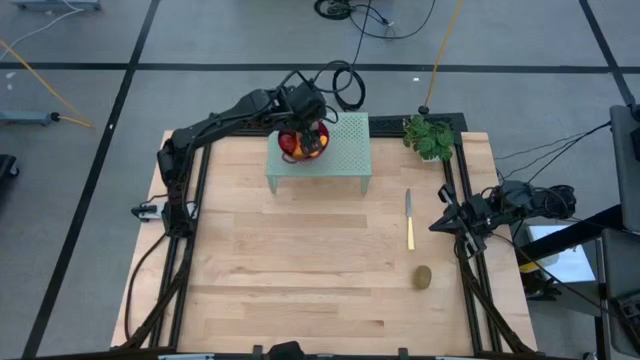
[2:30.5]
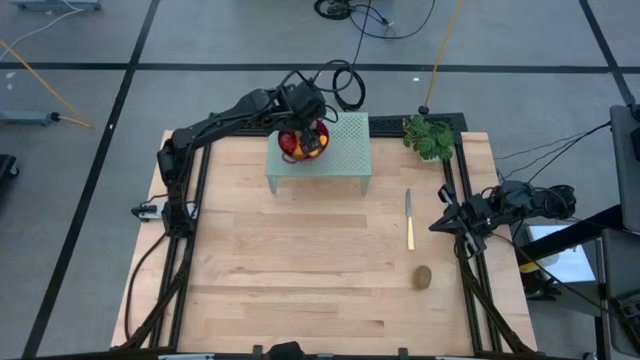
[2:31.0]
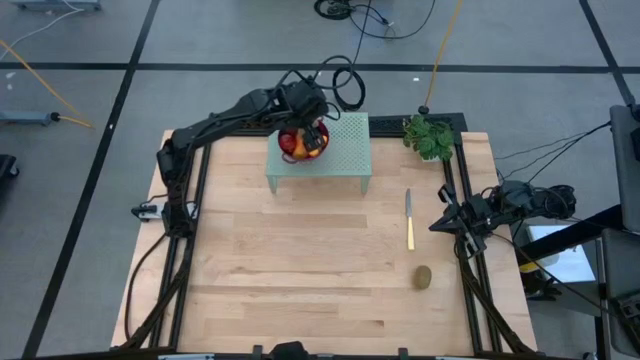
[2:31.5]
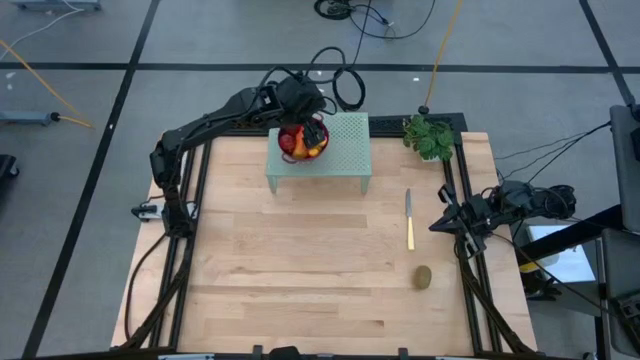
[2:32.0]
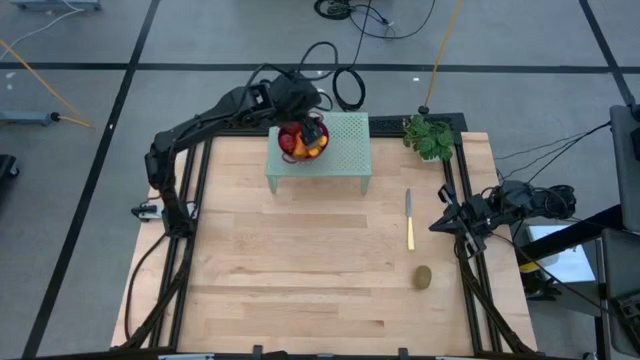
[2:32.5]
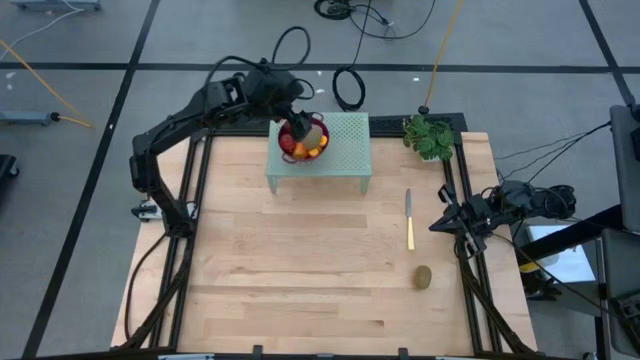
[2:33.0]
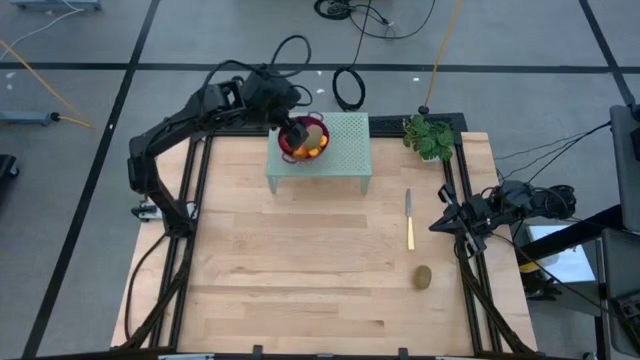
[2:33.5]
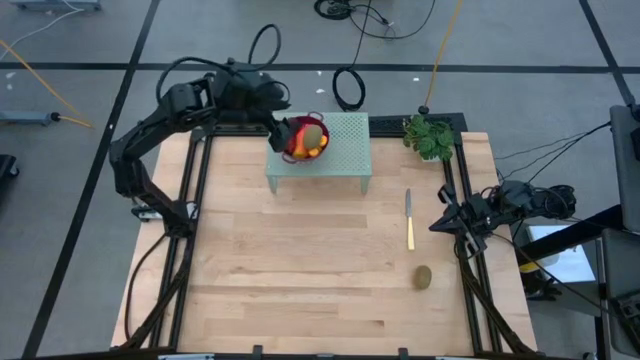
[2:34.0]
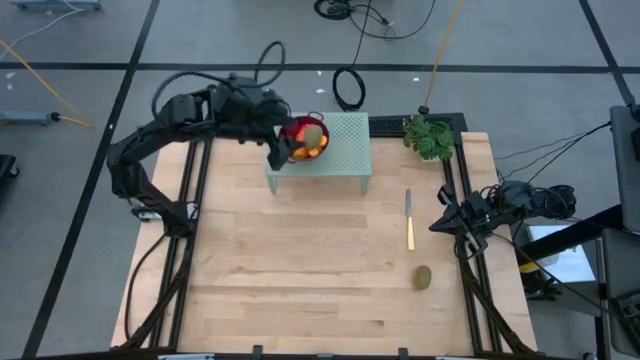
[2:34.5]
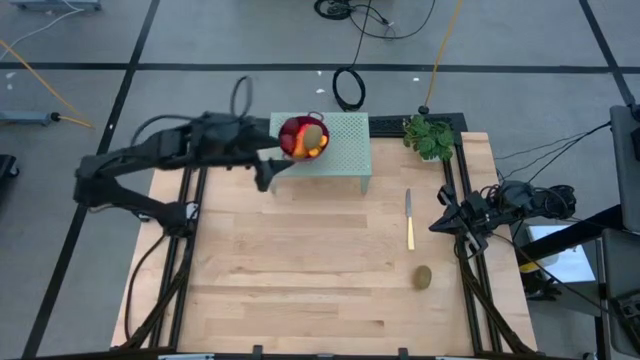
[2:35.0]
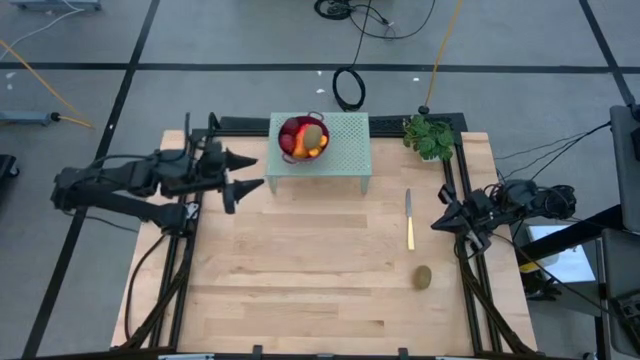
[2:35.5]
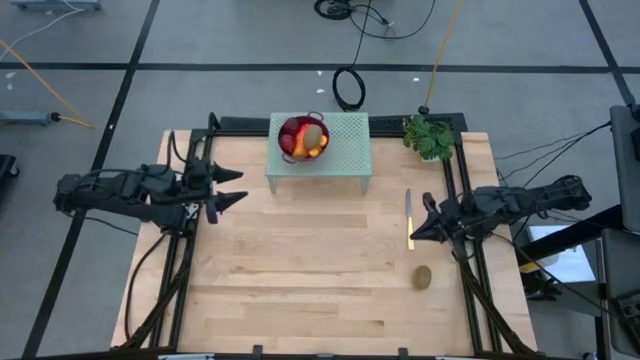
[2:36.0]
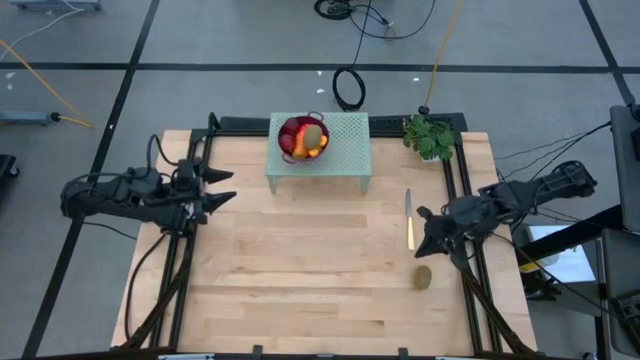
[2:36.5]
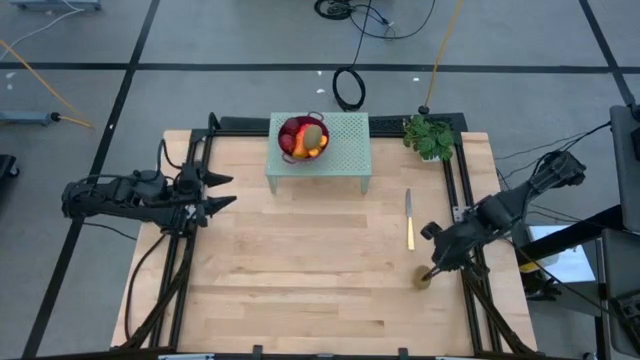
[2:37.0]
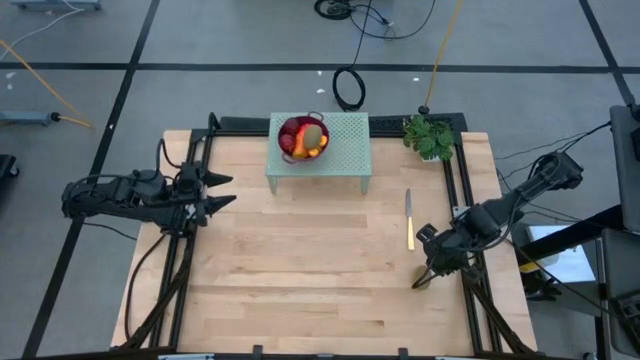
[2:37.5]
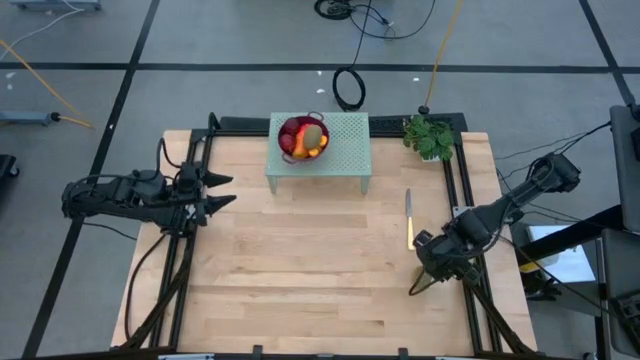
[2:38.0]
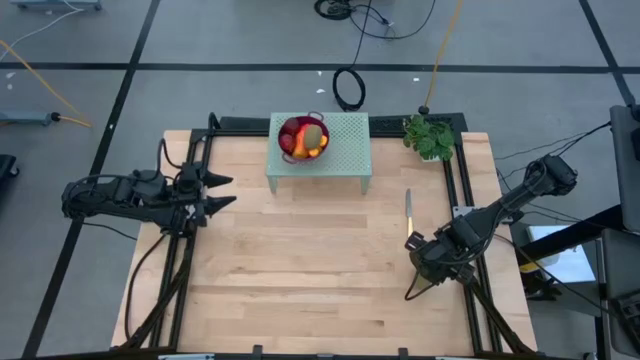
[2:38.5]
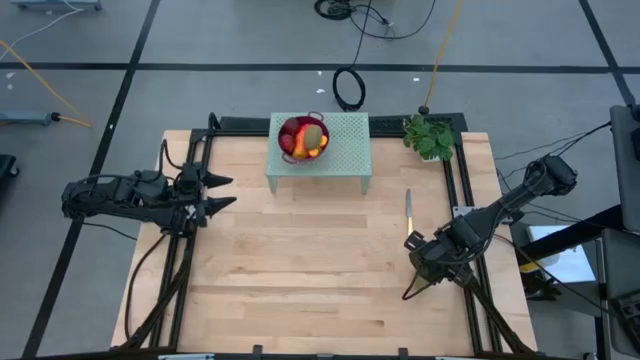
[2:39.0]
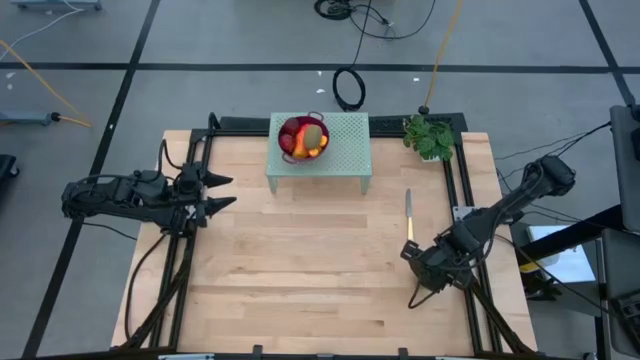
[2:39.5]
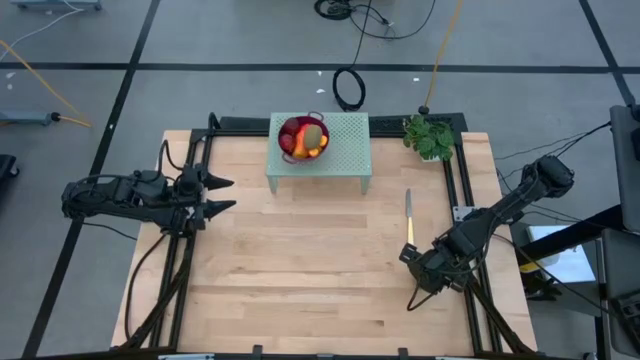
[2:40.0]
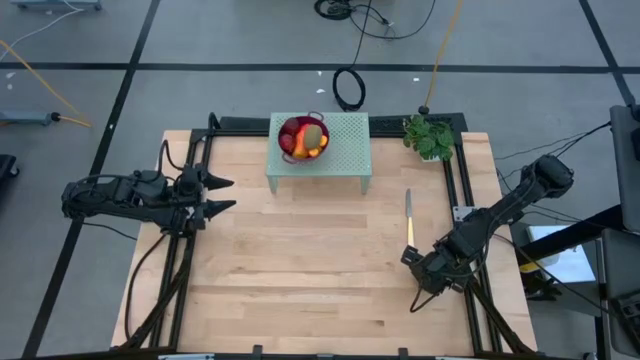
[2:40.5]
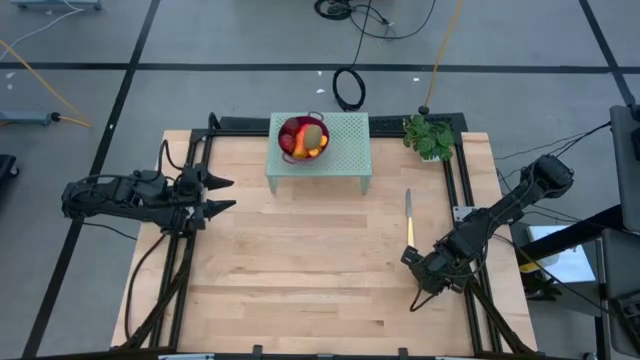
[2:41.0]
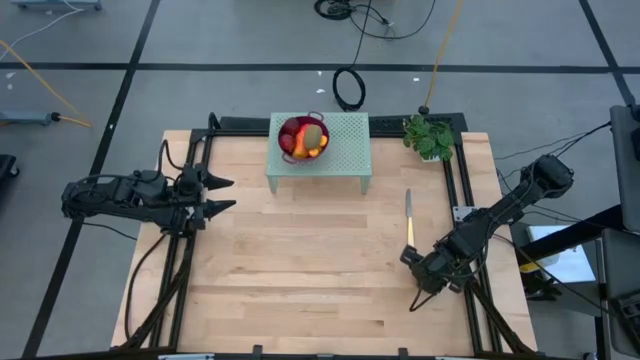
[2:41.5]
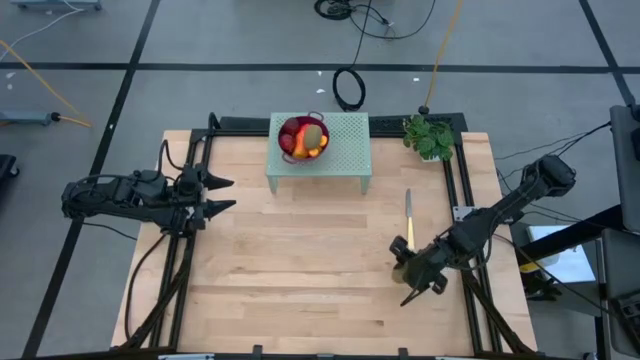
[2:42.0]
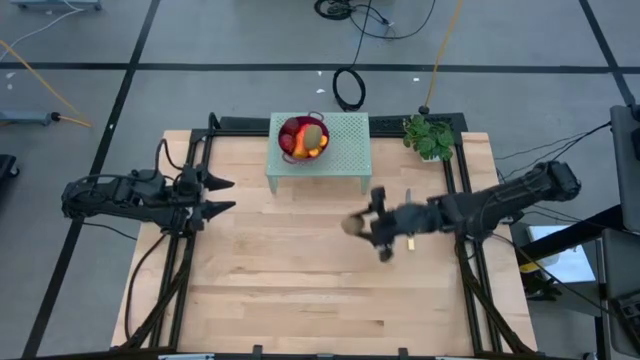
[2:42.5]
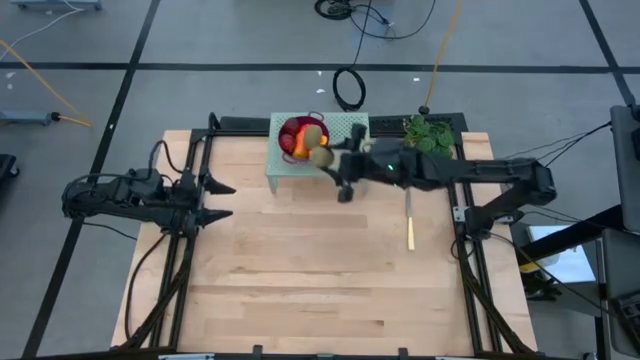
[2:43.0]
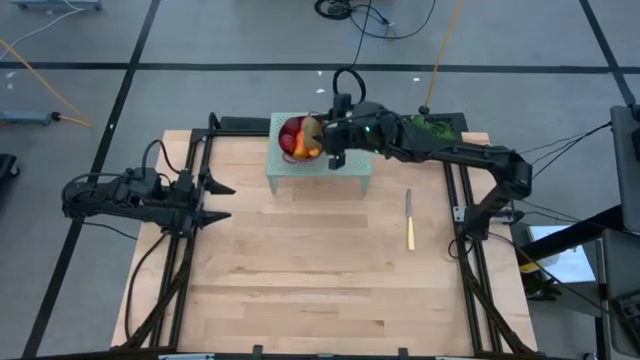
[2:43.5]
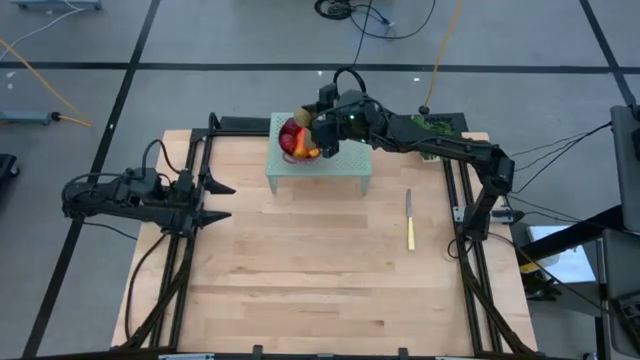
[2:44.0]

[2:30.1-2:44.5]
Task: Pick & Place Fruit
Put the kiwi into the violet strainer bowl on the shelf

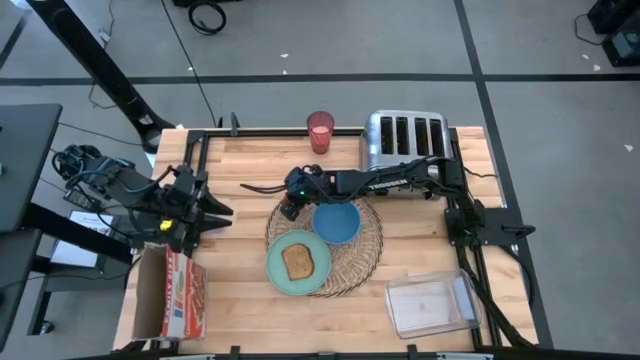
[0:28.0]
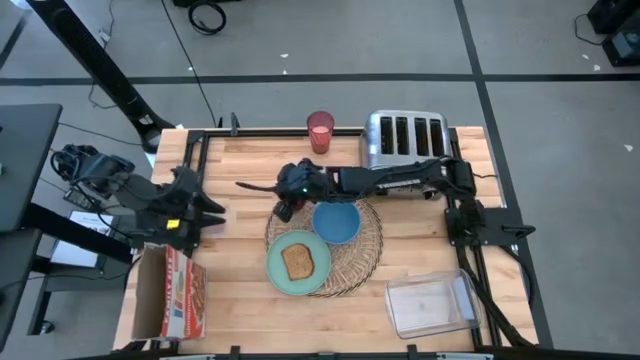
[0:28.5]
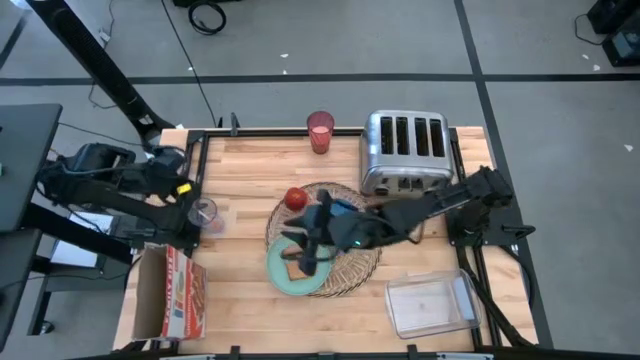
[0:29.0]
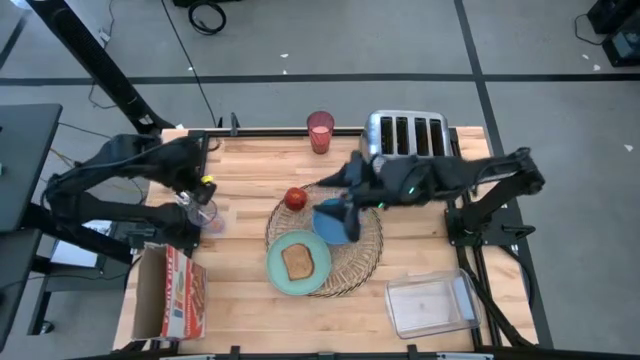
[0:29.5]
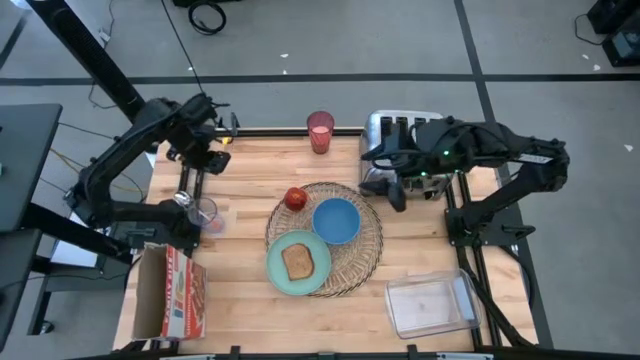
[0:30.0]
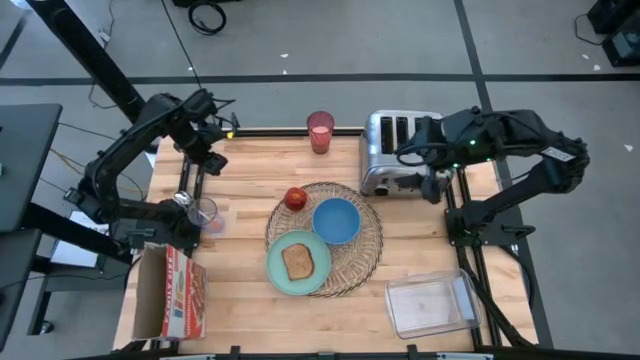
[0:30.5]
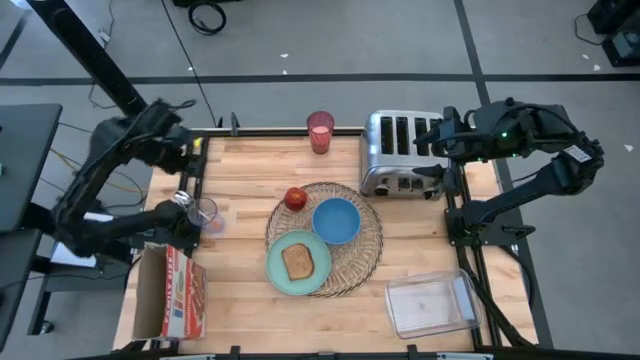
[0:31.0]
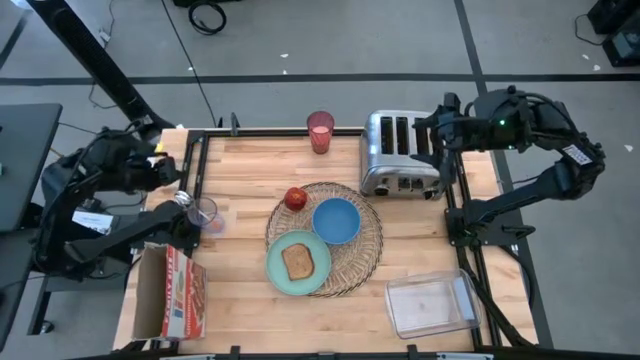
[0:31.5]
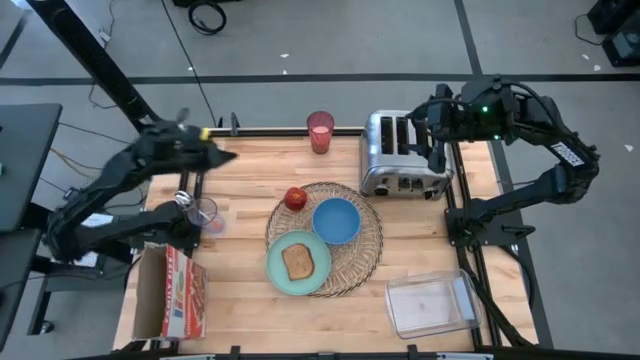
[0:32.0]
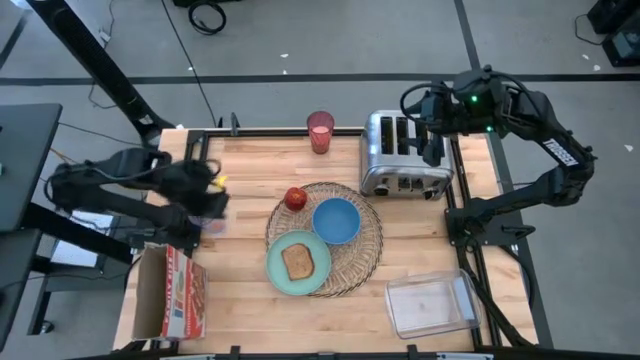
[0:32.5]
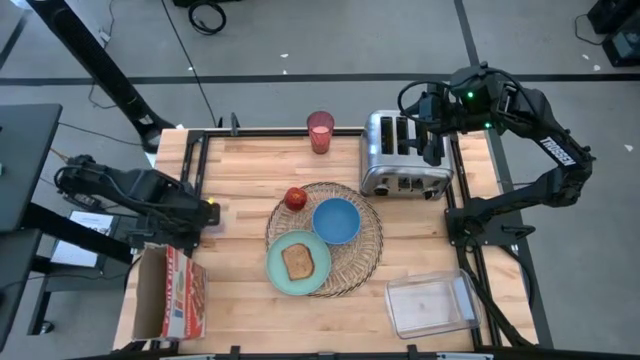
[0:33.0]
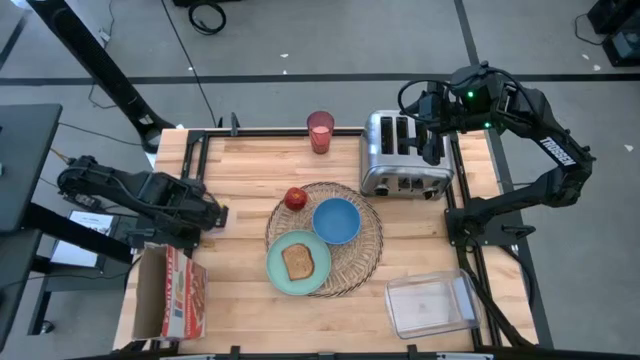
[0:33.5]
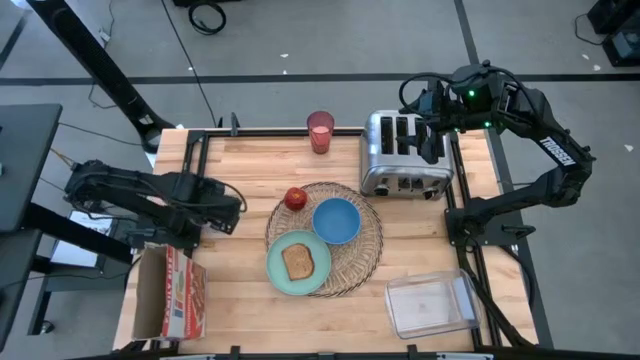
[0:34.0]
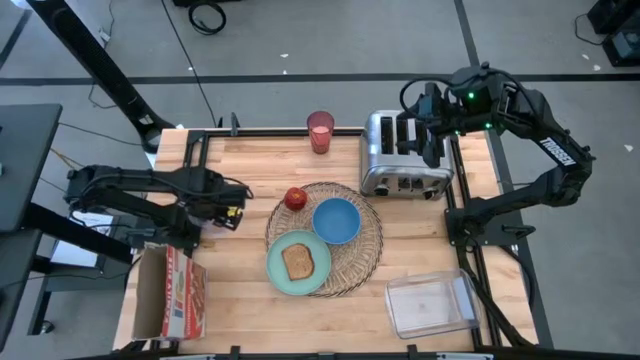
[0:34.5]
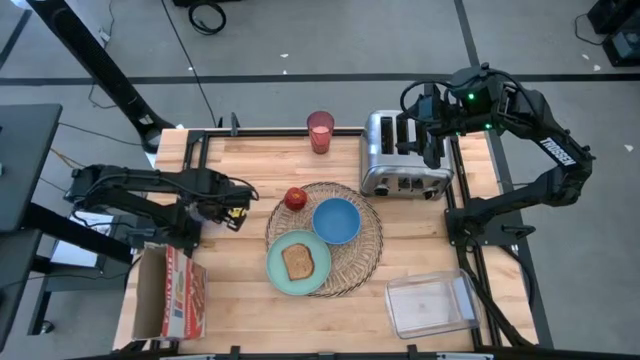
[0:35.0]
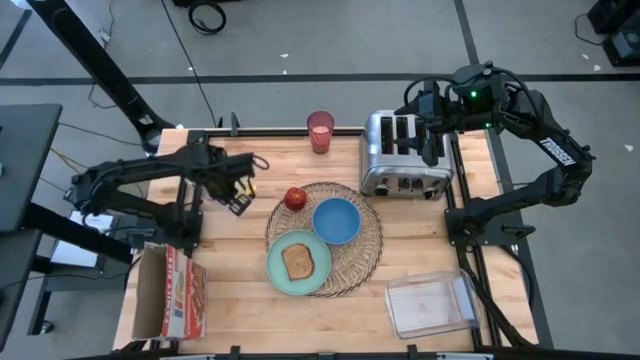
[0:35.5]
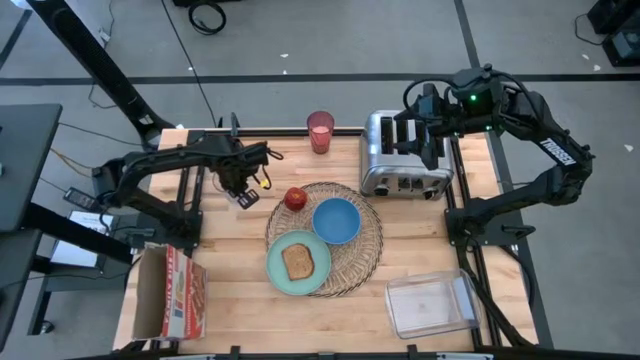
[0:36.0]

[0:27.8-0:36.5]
Task: Arrange a breakfast setting
Adjust the transparent cup
